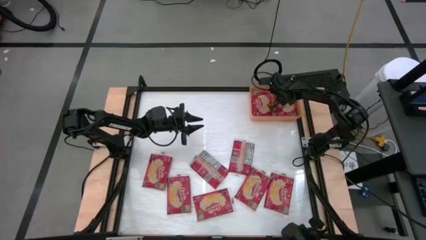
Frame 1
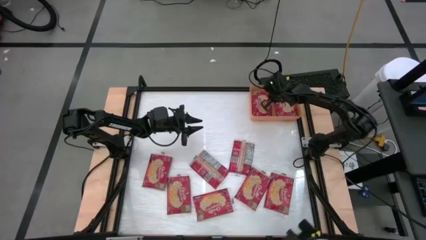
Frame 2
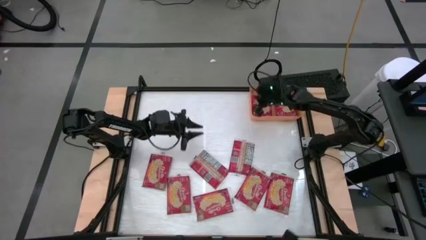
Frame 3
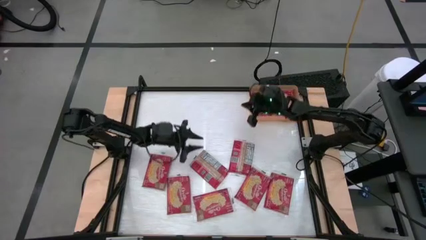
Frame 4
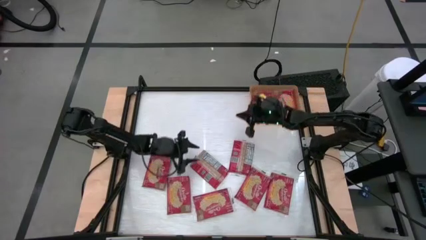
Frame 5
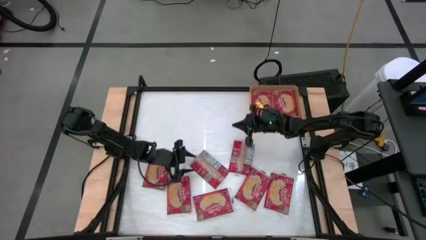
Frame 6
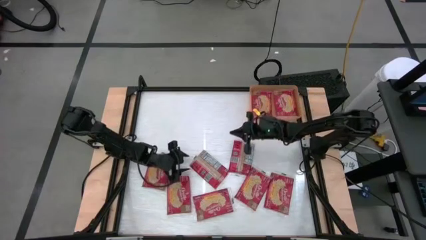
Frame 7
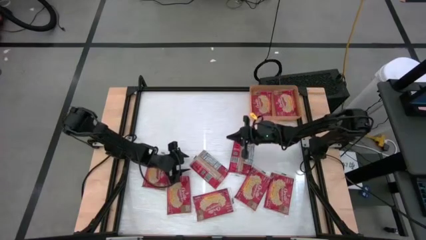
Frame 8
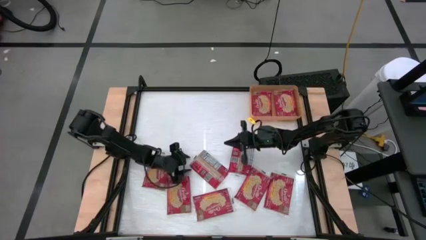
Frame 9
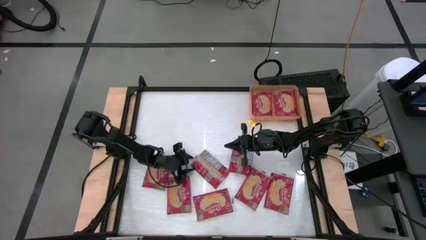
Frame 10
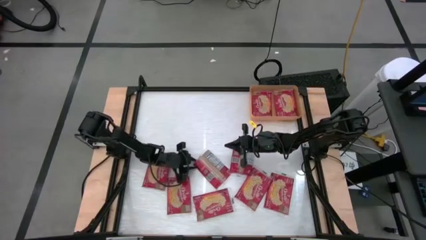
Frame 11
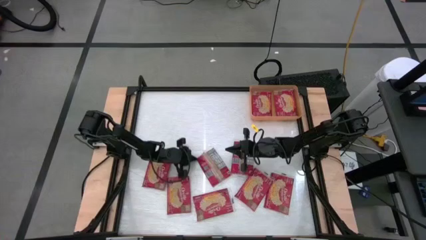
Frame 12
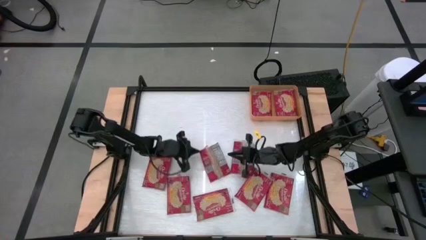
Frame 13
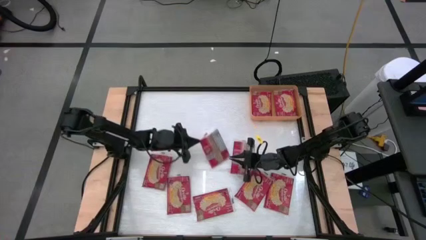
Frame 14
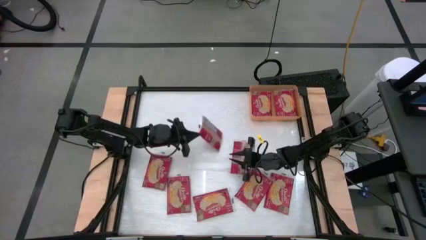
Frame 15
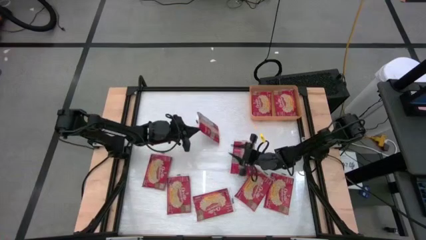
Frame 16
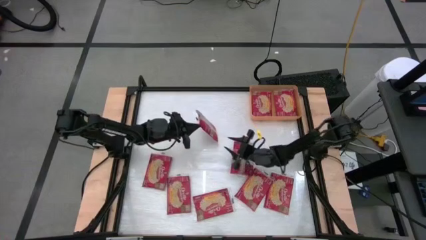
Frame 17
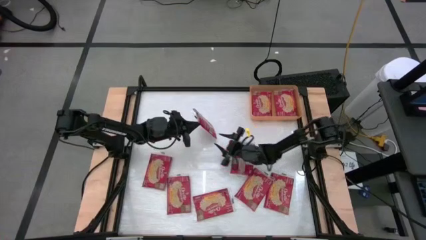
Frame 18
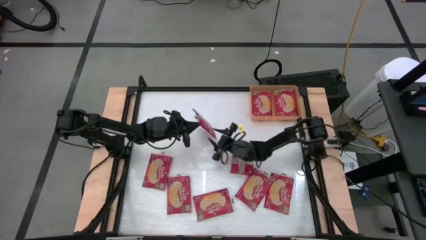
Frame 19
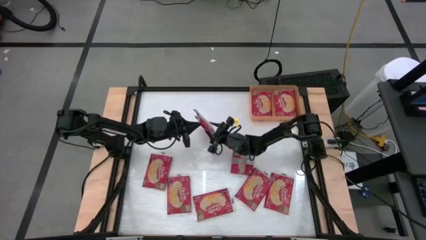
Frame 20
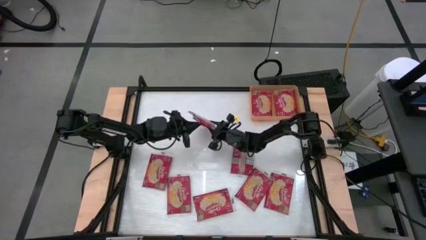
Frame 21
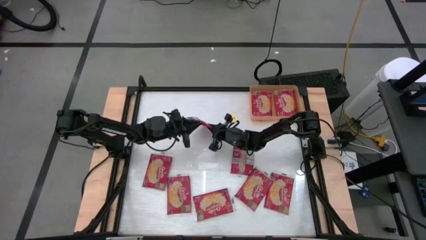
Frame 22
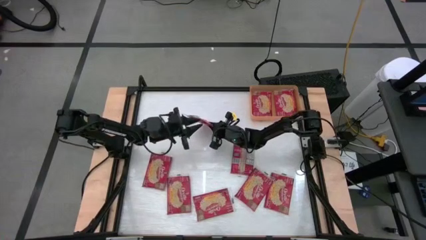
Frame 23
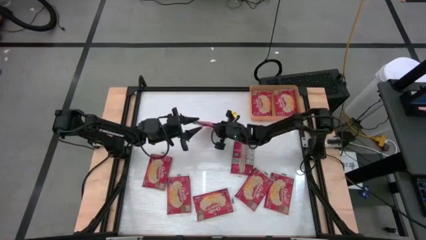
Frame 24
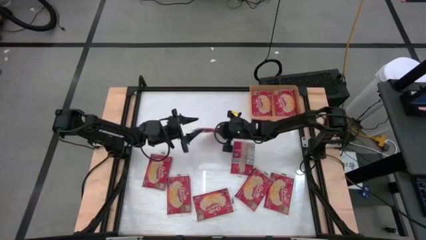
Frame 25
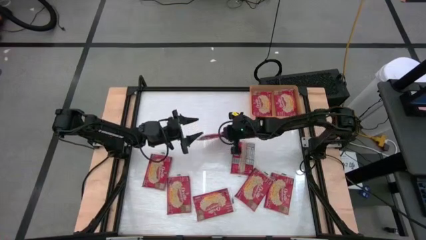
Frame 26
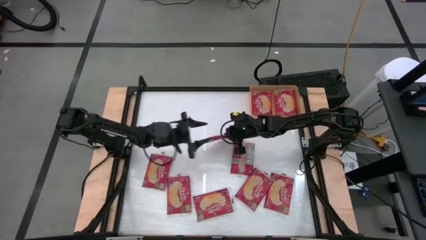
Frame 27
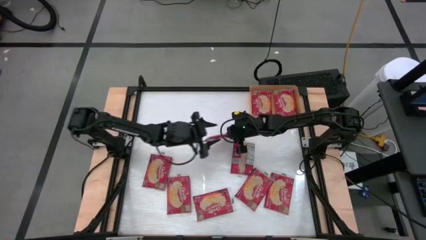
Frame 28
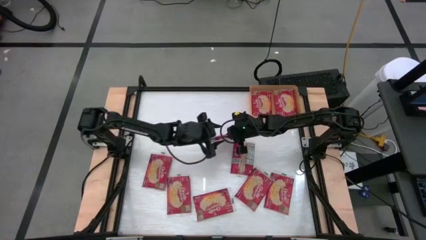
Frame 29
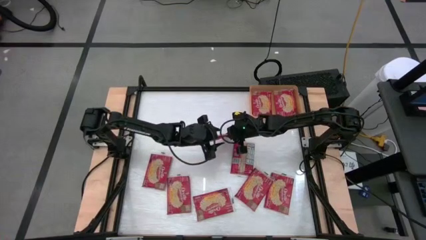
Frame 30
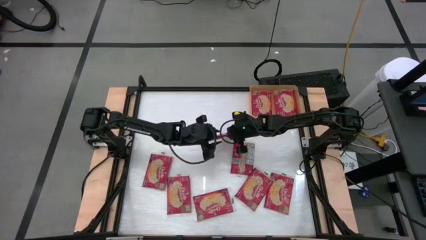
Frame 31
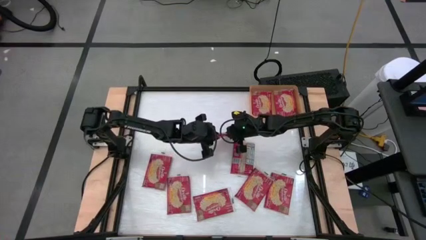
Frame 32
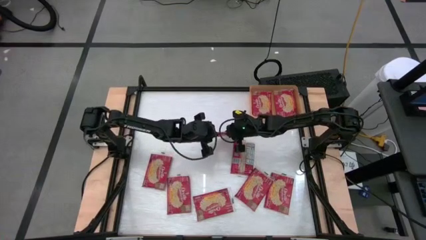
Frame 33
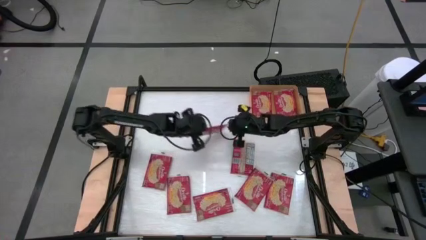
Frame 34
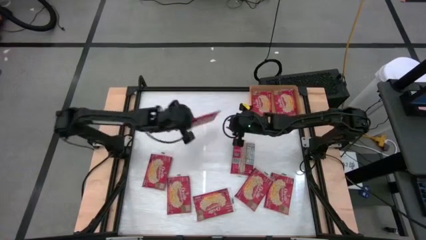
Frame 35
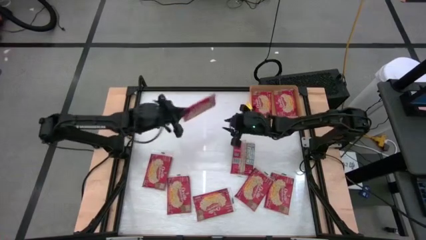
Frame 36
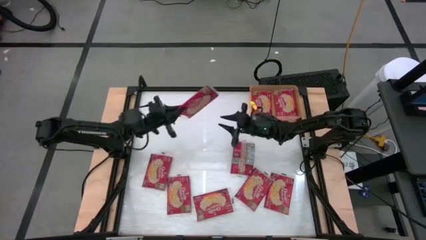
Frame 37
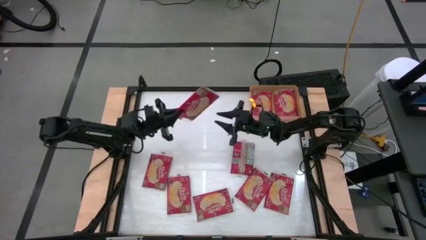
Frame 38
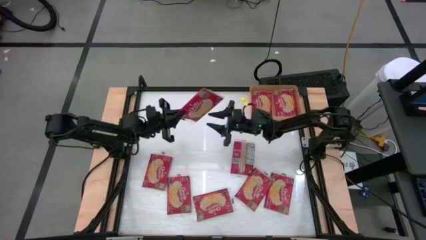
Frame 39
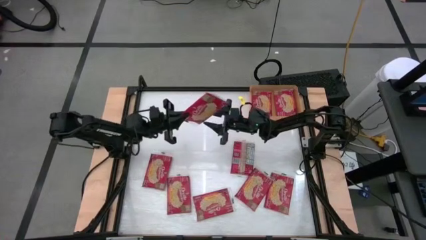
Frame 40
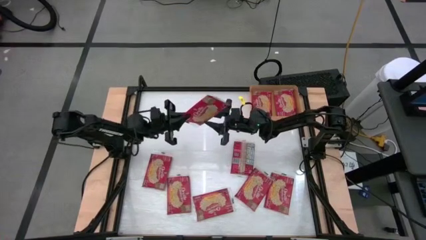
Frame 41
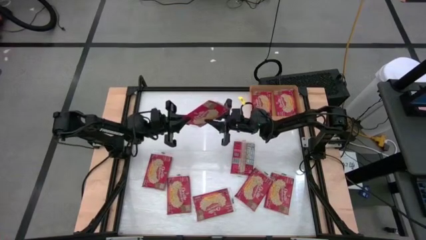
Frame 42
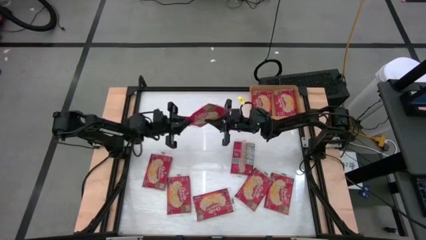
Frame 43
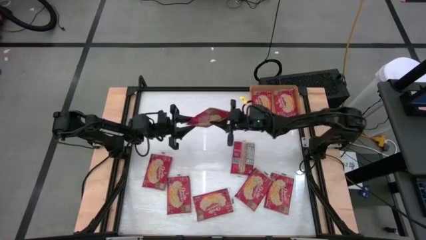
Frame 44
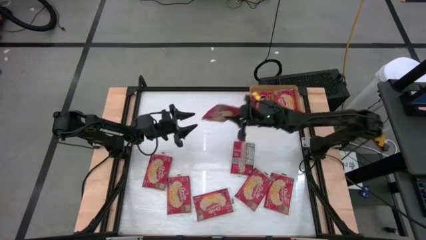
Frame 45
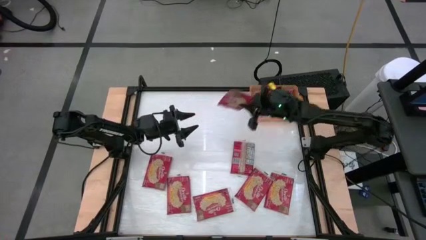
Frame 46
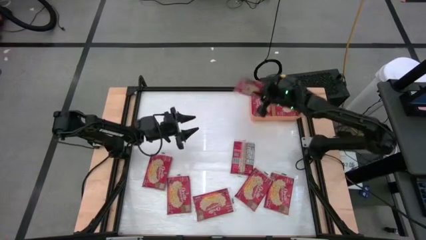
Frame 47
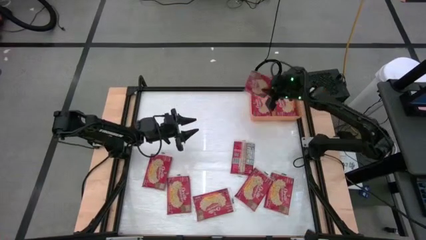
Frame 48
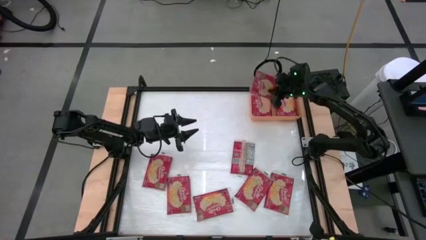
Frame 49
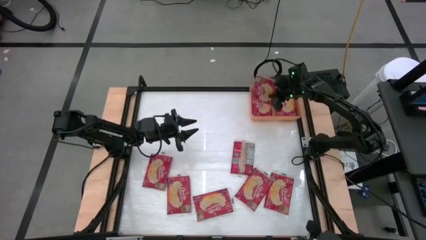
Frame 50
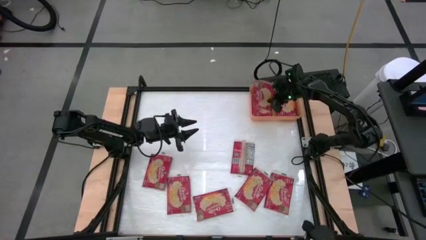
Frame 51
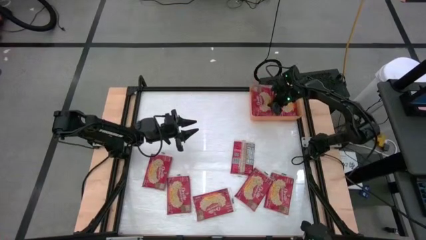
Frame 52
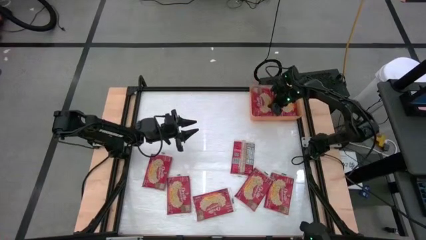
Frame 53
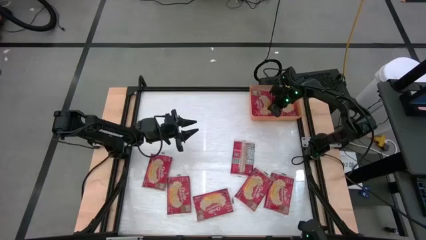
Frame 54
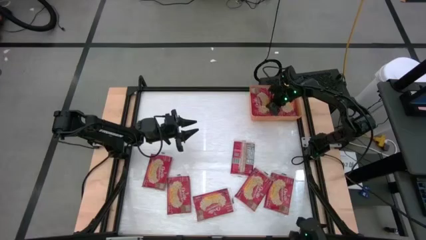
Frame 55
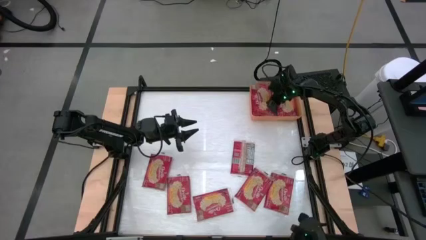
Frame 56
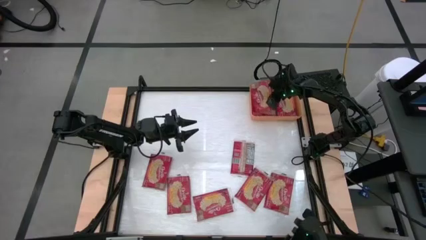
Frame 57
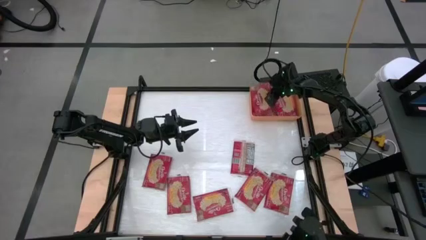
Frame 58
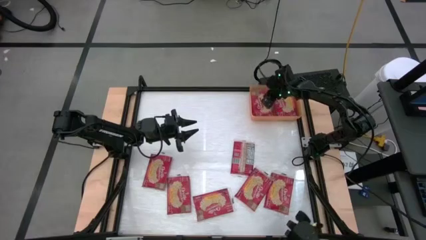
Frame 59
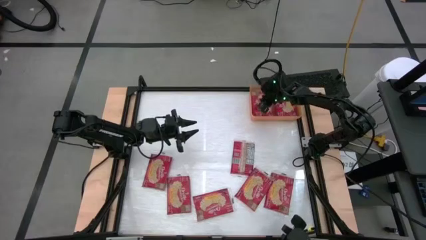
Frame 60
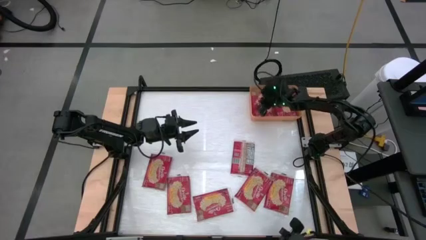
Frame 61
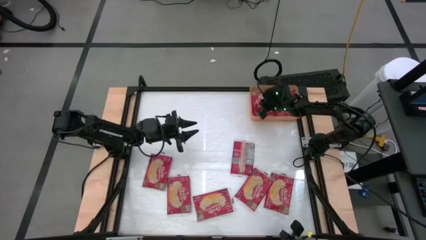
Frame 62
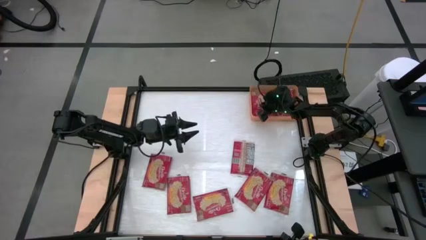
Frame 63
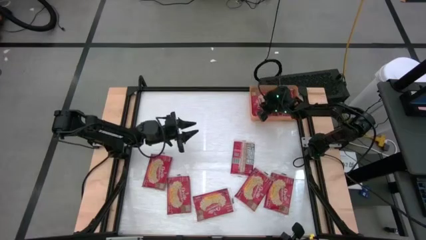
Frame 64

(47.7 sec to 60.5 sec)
Task: Sort popcorn bags into baskets
Put the red popcorn bag into the orange bin

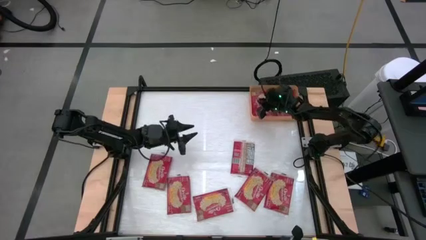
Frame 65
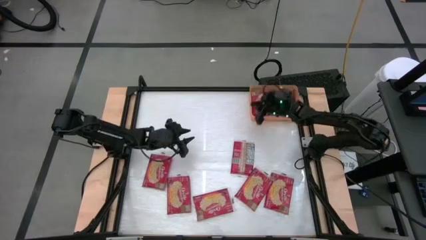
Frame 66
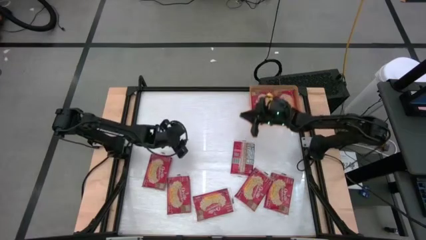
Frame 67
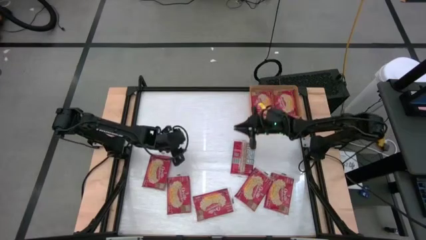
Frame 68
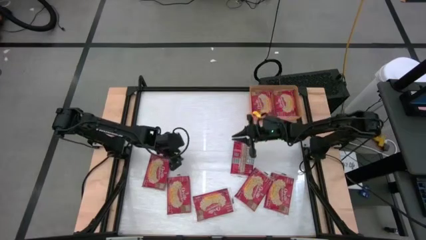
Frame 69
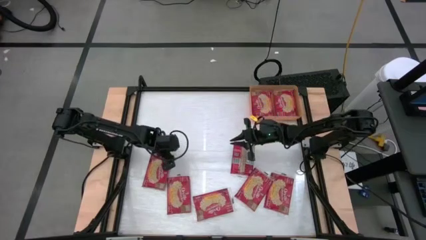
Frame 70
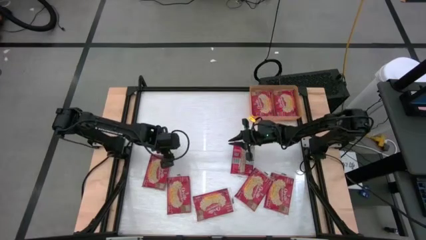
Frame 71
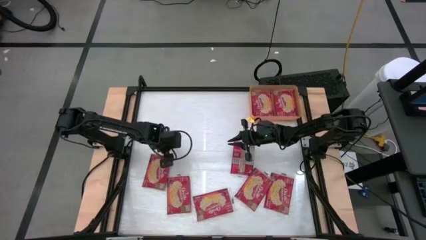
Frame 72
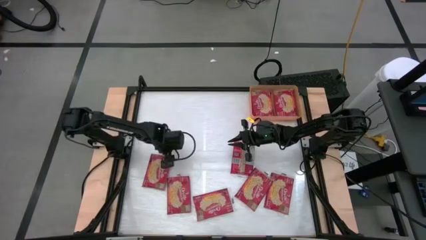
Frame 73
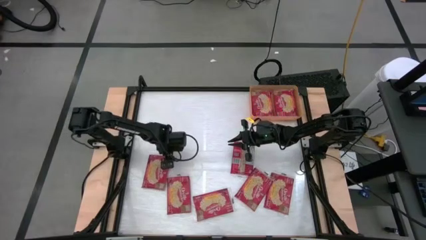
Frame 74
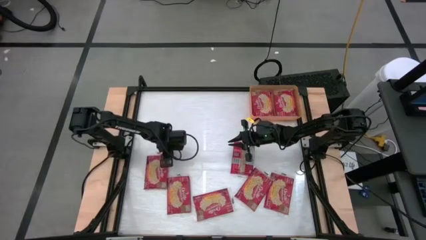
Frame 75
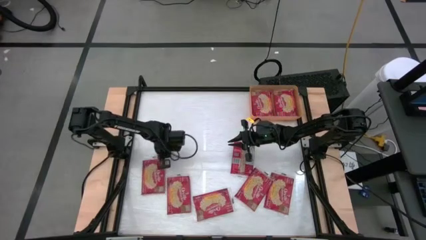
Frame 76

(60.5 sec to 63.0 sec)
Put the red popcorn bag into the orange bin
